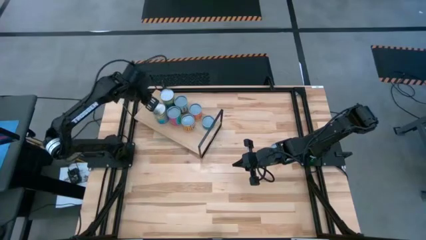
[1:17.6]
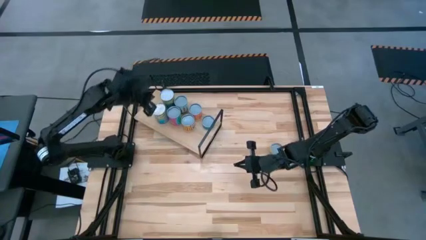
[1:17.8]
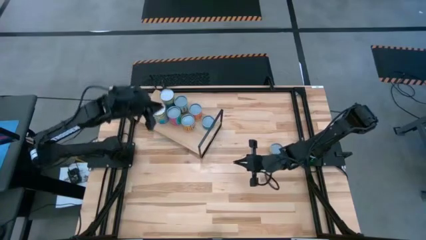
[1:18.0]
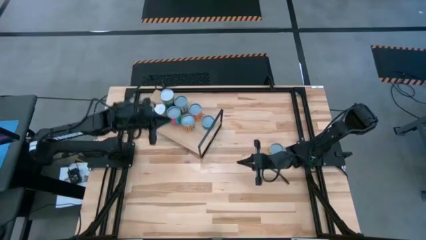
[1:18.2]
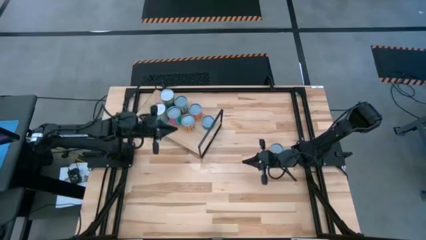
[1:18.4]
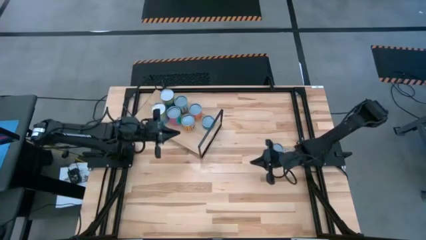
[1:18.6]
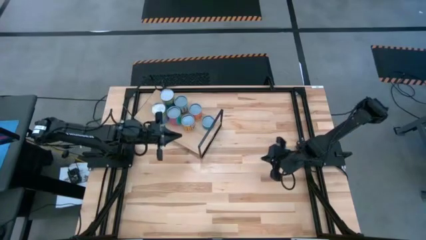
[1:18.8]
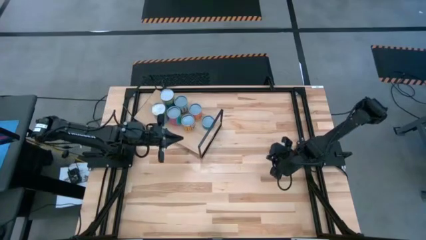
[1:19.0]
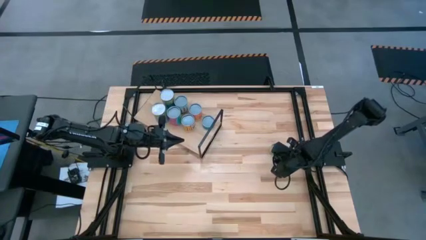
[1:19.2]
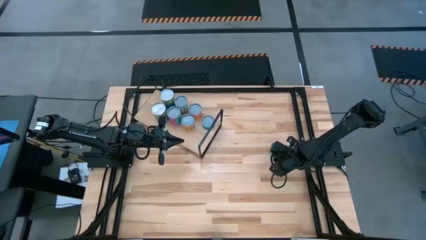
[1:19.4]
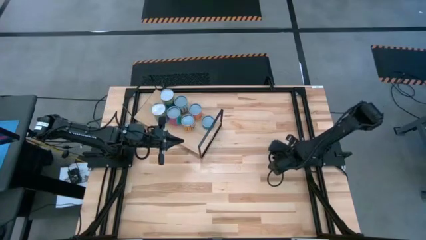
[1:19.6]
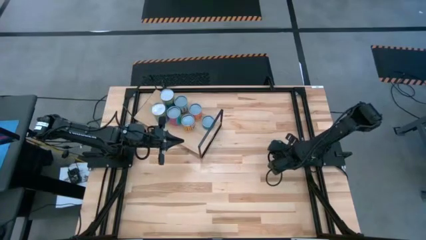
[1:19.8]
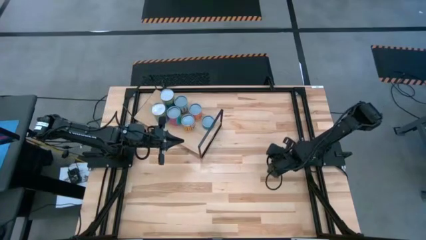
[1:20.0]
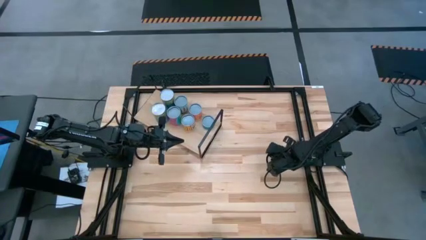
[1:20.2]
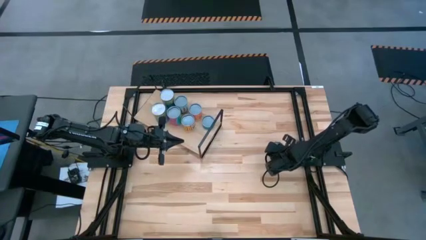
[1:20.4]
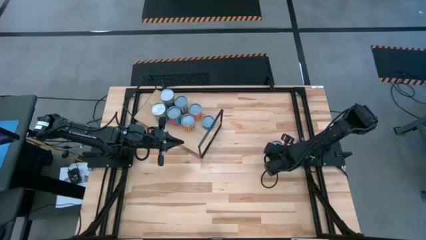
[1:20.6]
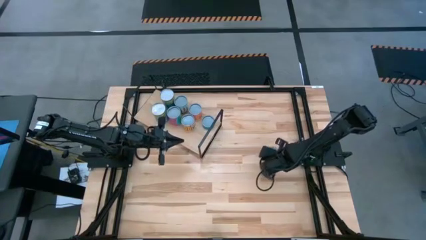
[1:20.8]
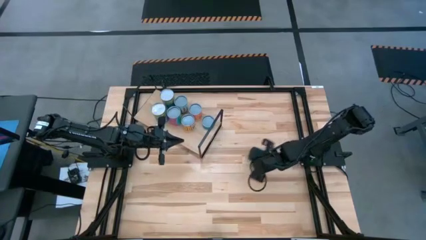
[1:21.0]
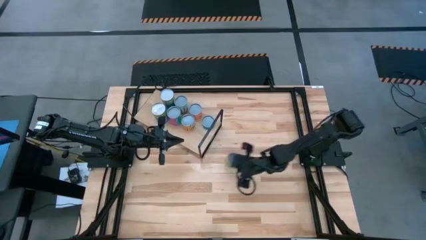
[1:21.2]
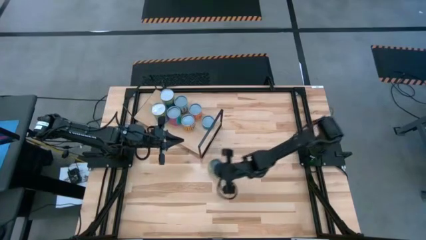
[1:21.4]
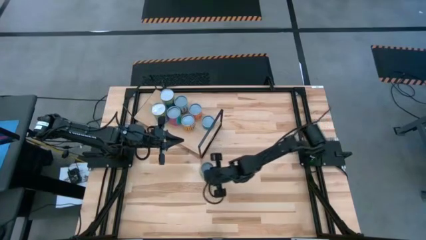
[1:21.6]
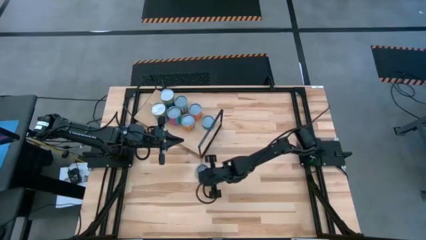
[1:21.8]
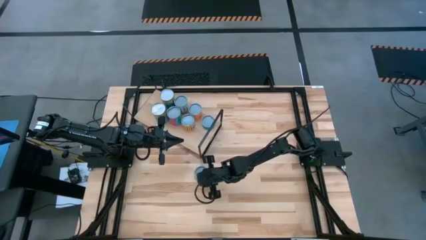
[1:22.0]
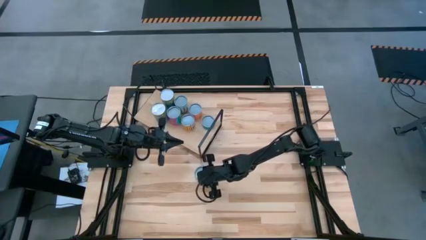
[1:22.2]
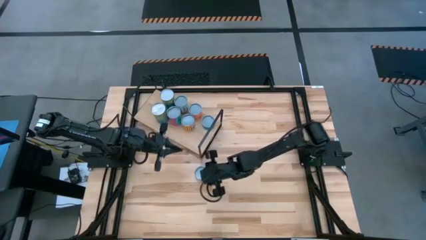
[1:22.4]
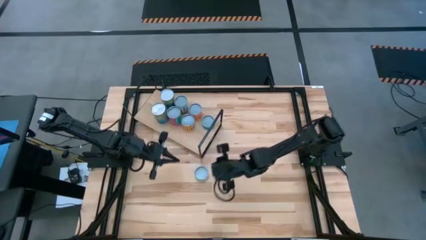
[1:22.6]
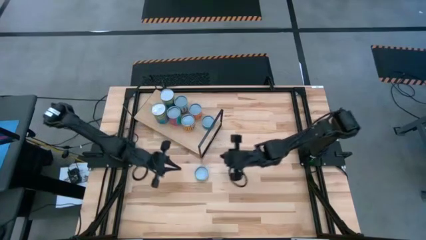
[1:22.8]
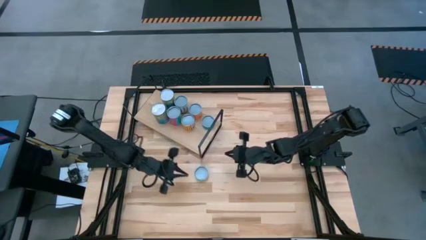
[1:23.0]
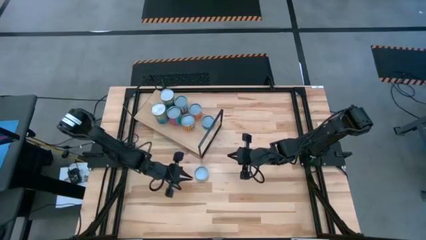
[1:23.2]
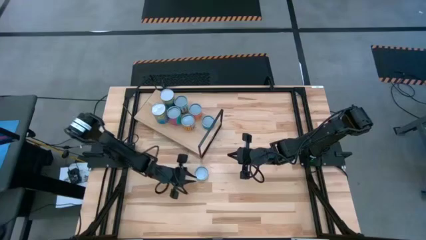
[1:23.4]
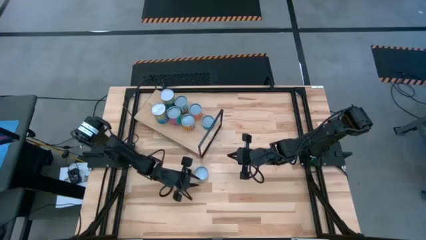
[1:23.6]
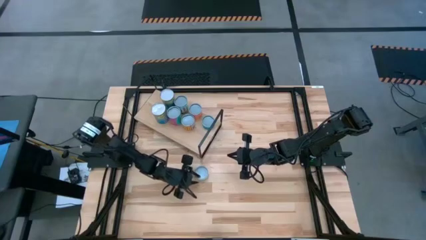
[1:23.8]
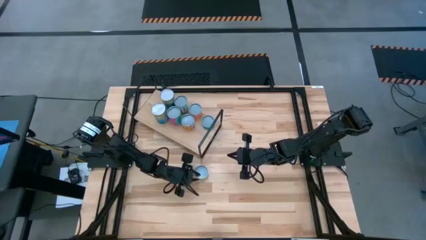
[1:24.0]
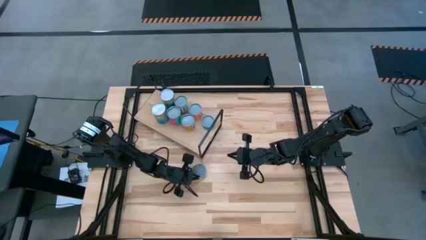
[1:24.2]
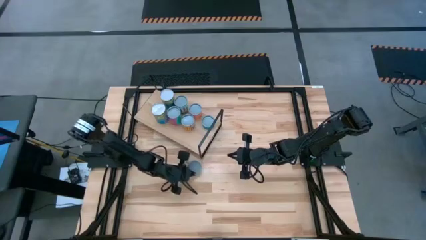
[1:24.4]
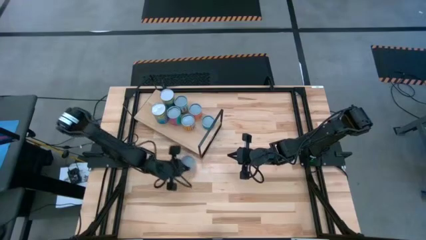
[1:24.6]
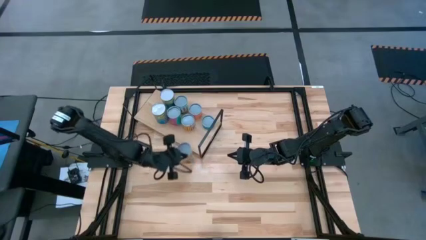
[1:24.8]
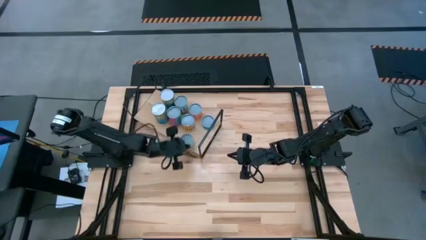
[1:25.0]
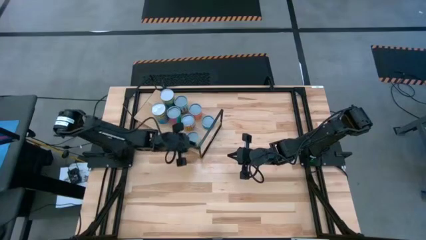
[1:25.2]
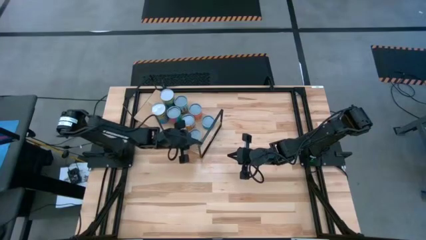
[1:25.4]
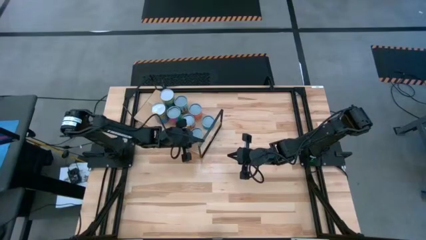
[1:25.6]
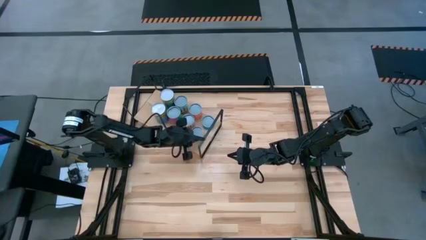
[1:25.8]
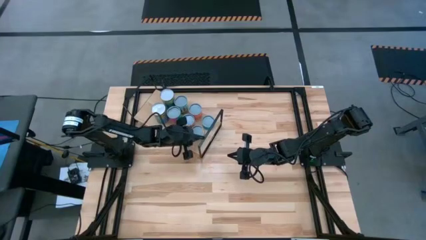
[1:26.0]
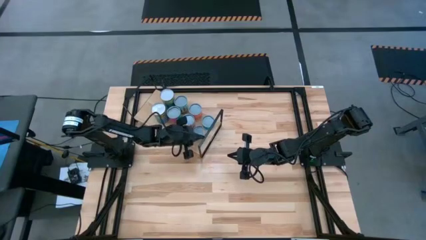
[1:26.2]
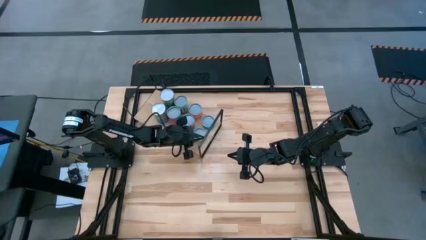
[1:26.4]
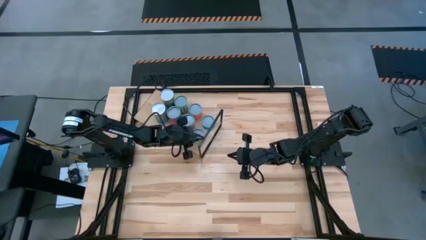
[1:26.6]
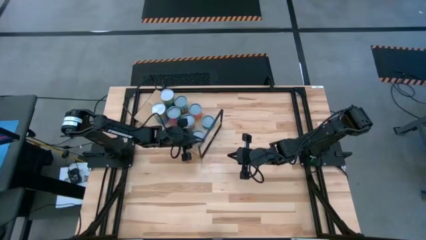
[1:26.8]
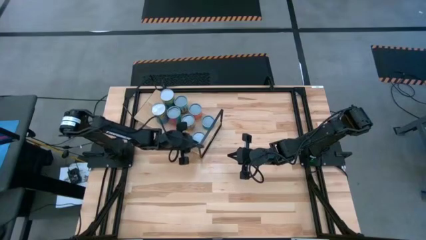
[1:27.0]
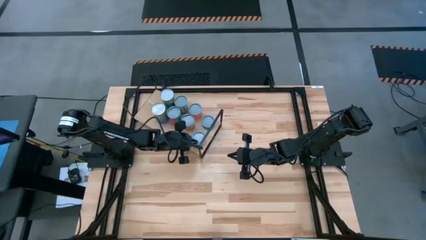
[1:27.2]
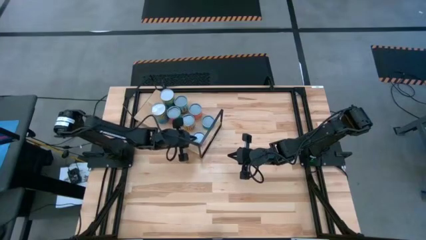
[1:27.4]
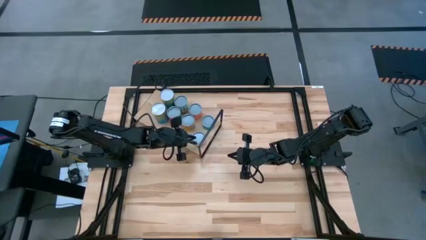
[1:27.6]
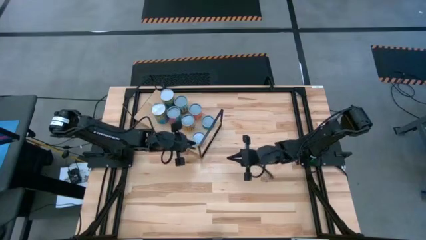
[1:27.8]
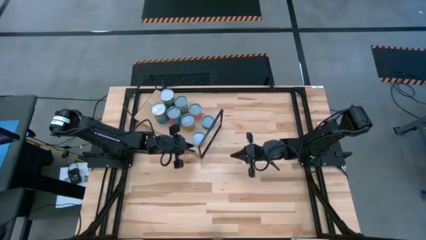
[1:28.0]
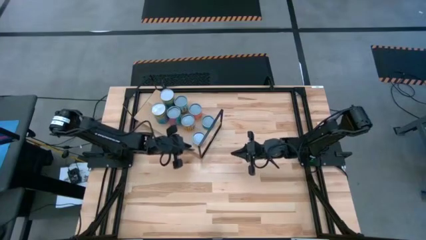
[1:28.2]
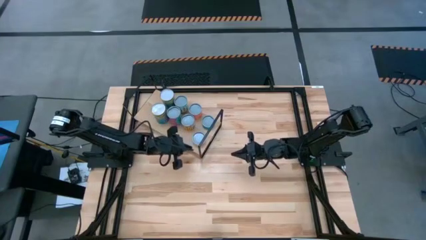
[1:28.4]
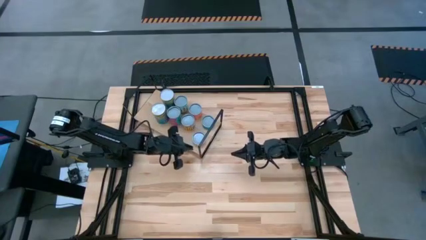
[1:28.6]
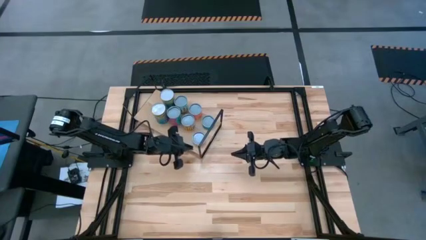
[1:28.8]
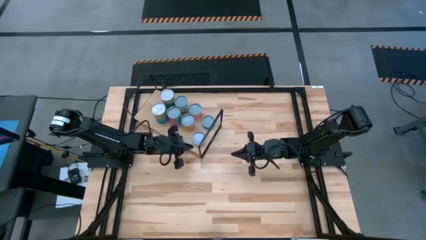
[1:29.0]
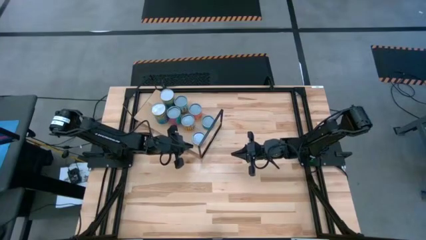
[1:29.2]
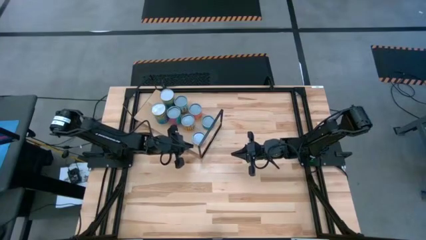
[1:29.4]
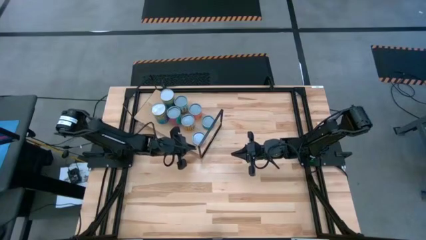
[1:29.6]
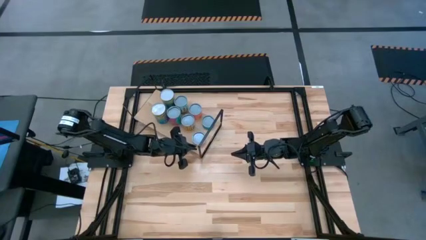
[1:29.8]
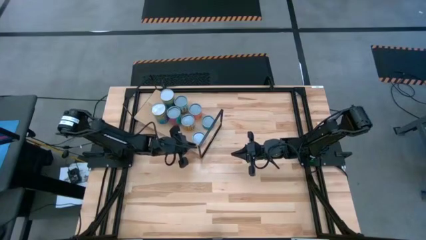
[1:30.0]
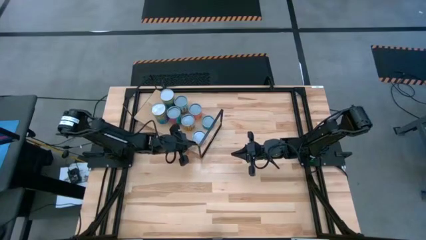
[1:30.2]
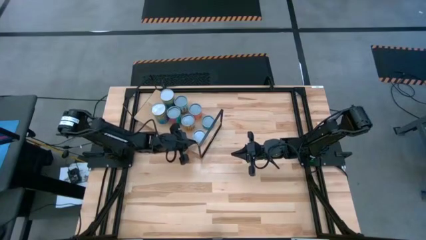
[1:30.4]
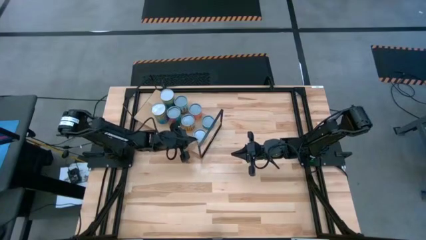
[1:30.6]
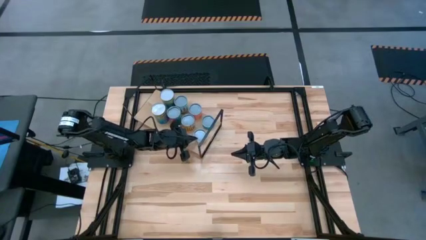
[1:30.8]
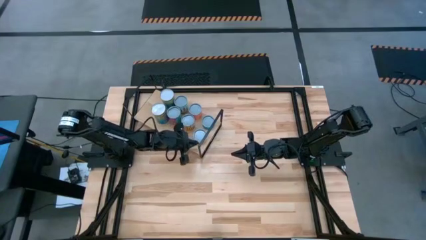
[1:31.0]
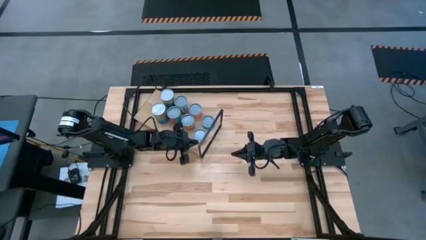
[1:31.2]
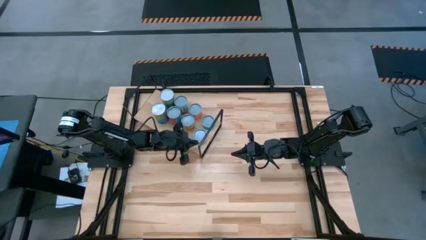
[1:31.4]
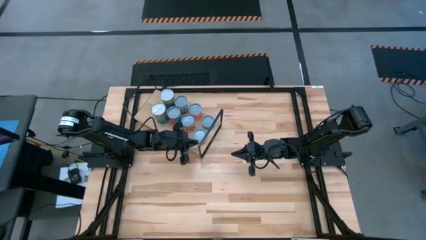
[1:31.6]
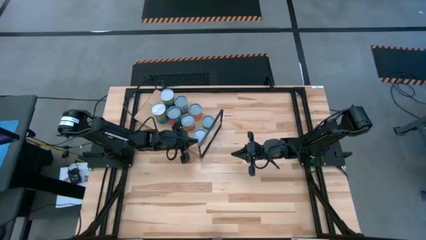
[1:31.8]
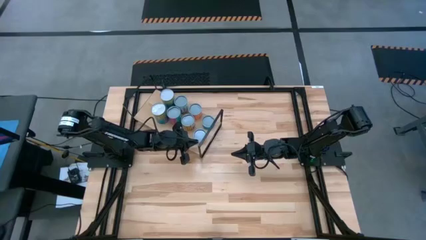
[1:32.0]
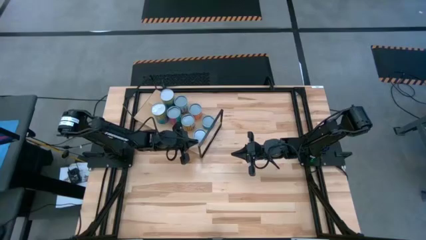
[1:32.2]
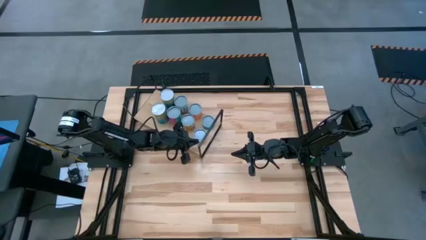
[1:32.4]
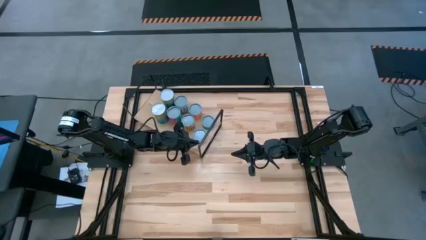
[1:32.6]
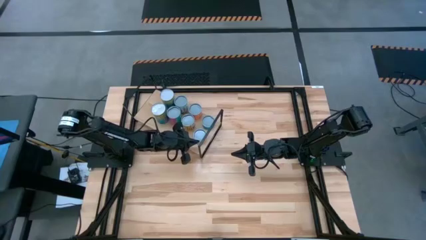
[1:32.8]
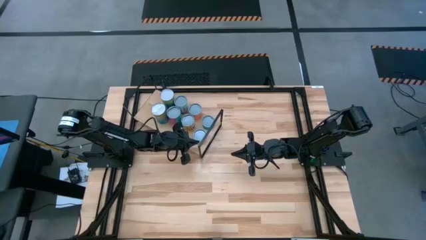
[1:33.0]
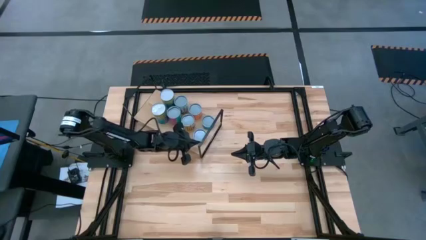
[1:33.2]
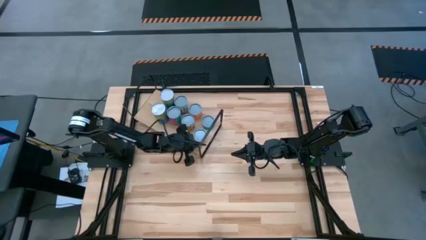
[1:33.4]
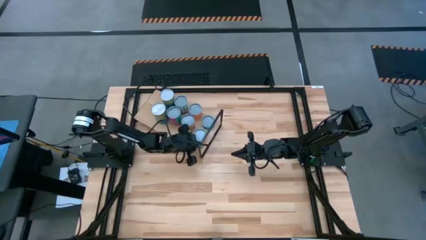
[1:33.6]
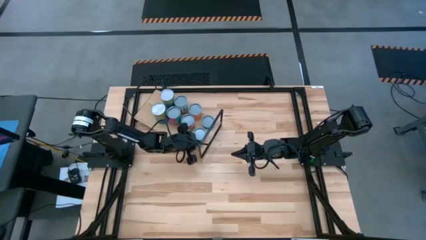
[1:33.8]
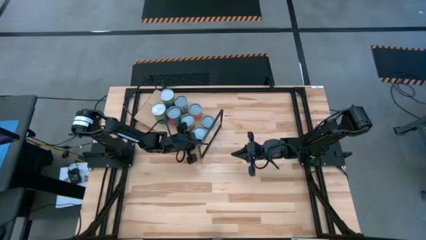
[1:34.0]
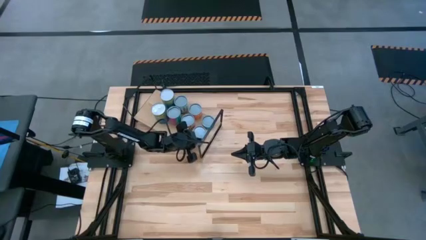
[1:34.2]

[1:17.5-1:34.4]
Task: Pick and place cans onto a shelf
Put the canned mushrooms on the shelf
